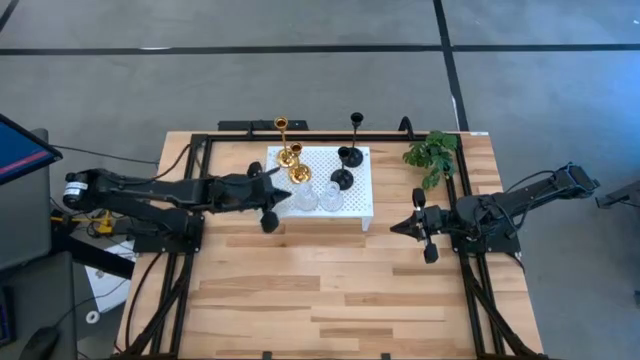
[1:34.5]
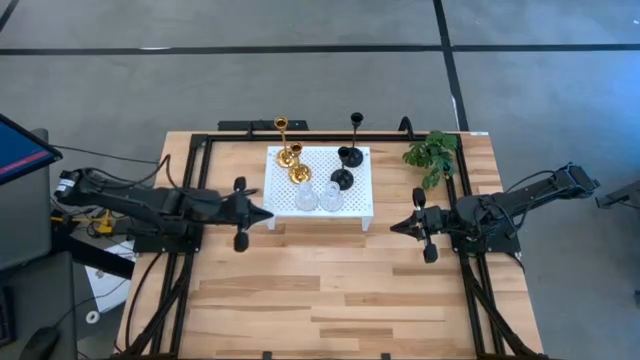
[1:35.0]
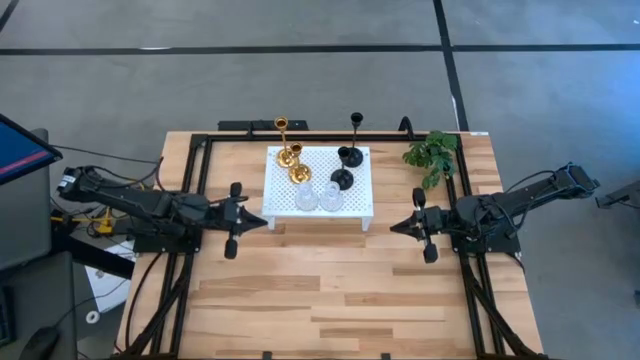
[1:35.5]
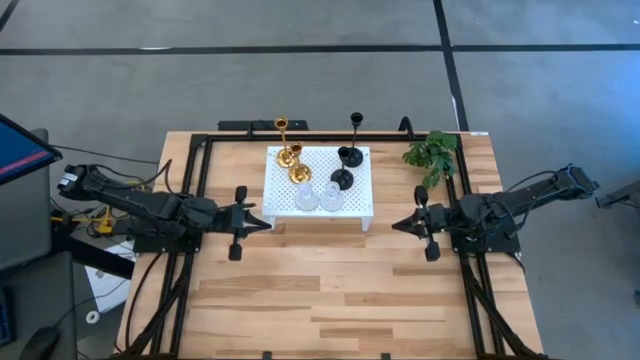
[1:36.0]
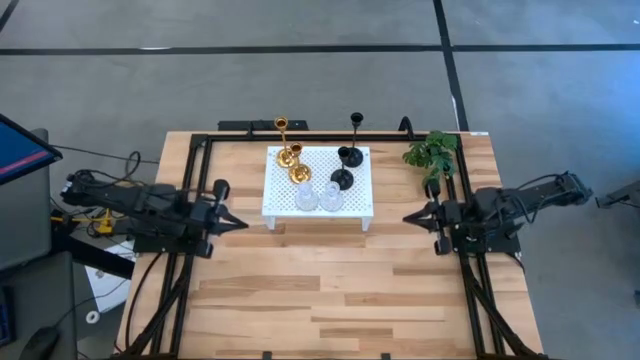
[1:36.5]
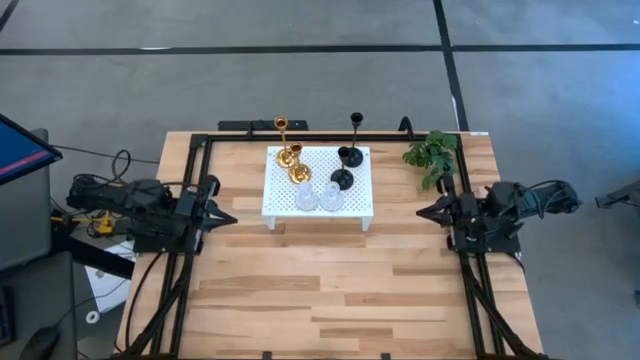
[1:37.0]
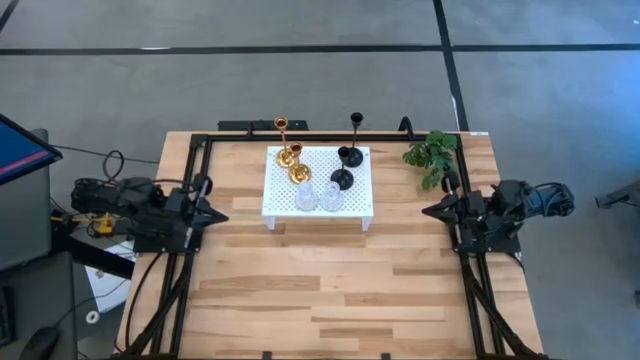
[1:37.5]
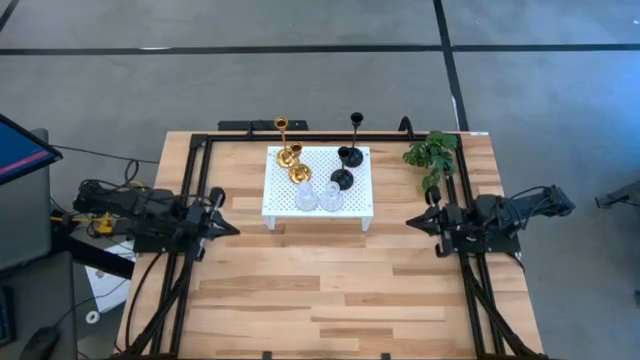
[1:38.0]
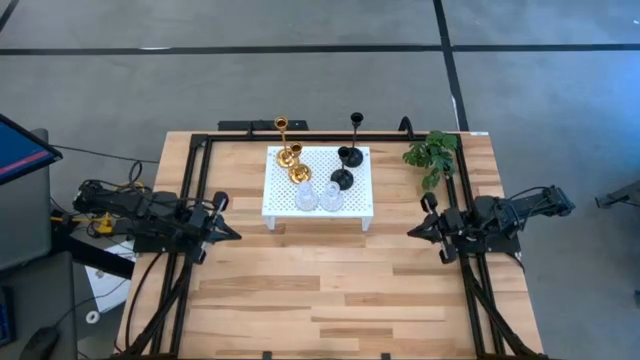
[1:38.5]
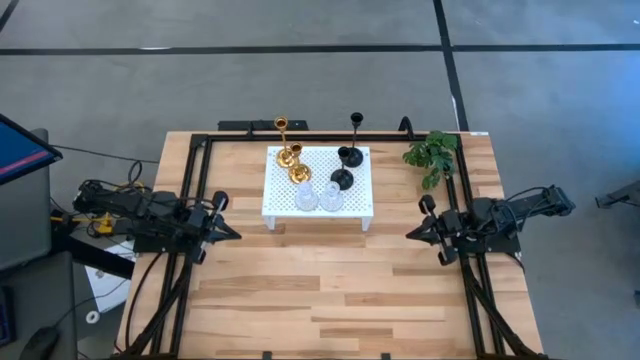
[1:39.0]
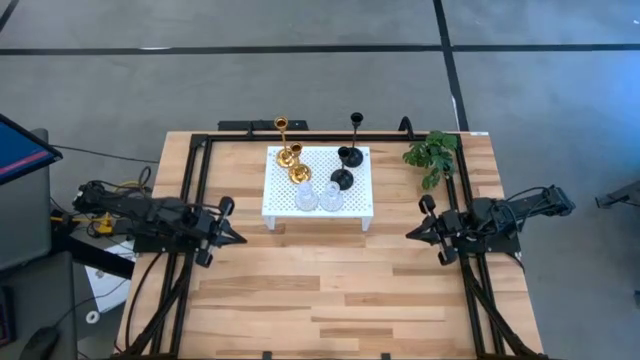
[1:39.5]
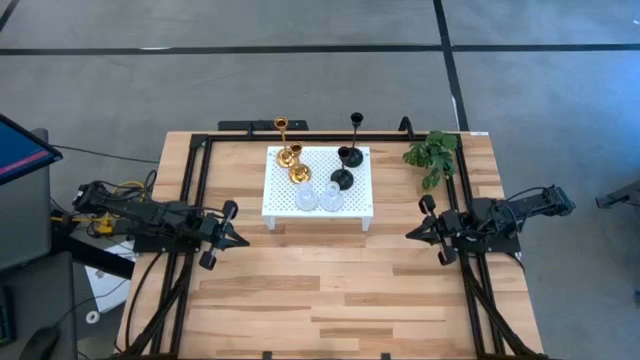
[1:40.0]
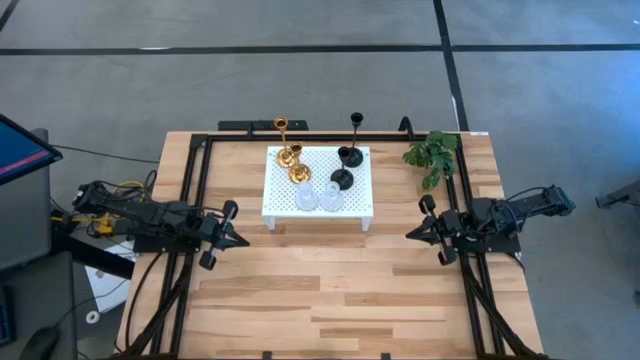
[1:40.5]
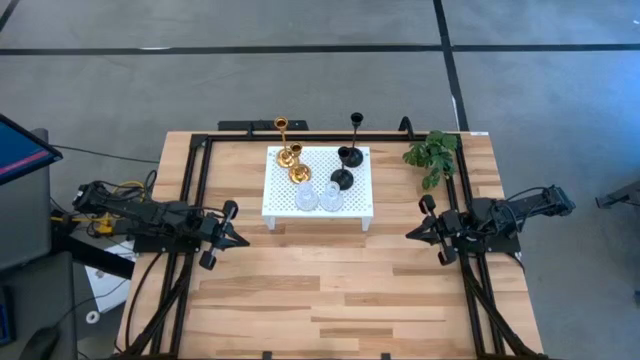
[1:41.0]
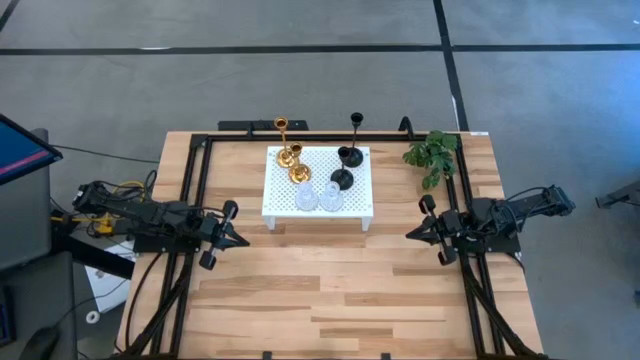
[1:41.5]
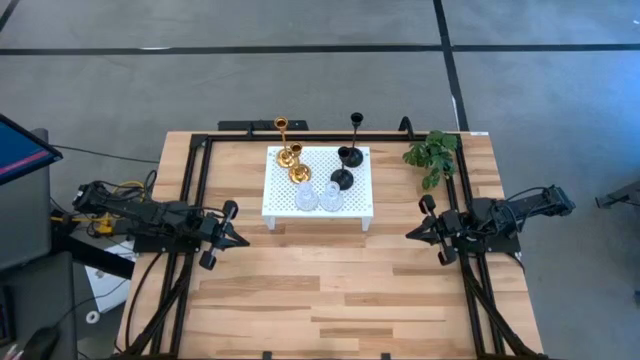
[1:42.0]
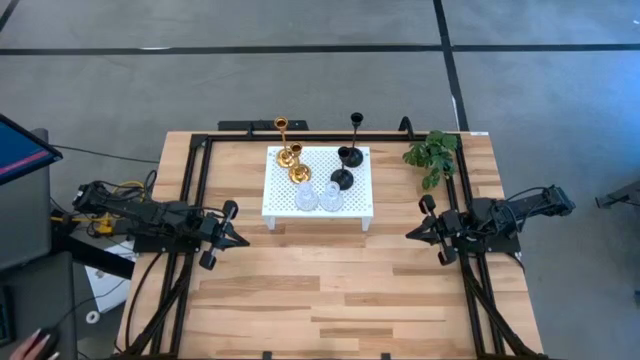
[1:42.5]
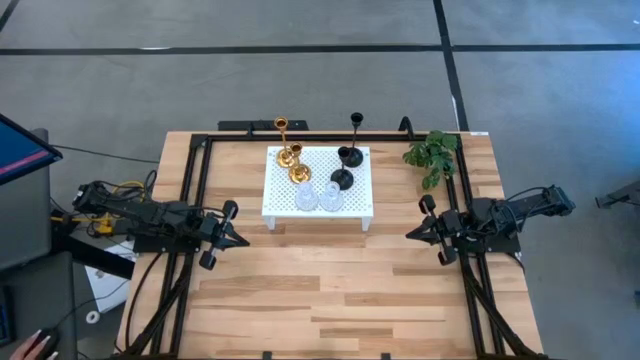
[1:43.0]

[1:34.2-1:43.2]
Task: Pick & Place candle stick holders
Return to Home Position

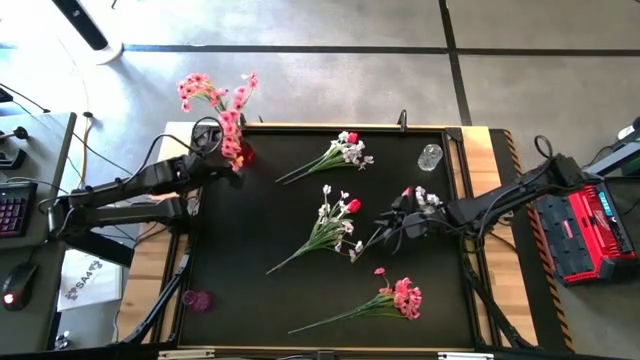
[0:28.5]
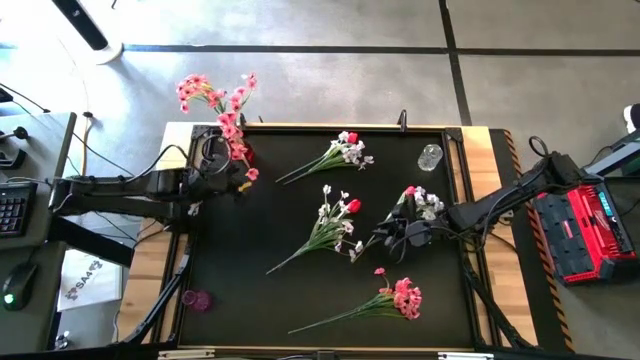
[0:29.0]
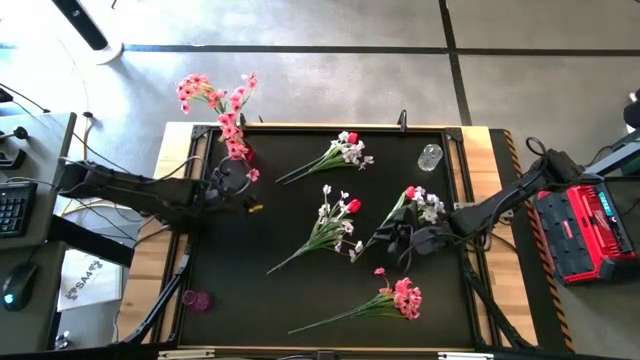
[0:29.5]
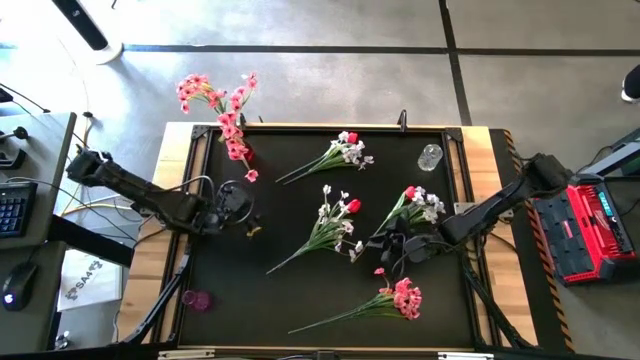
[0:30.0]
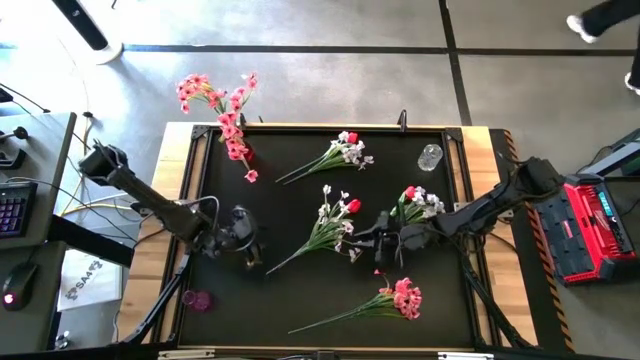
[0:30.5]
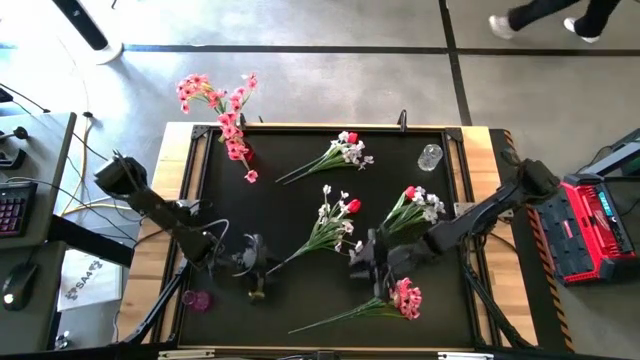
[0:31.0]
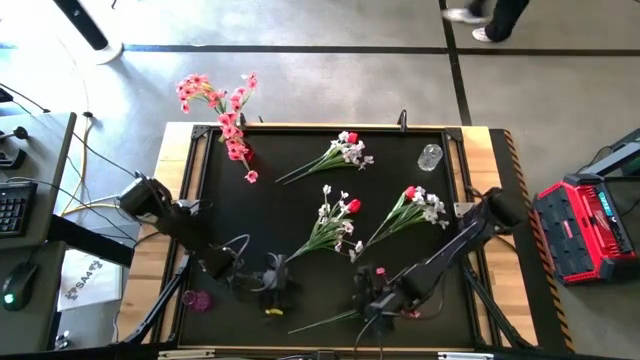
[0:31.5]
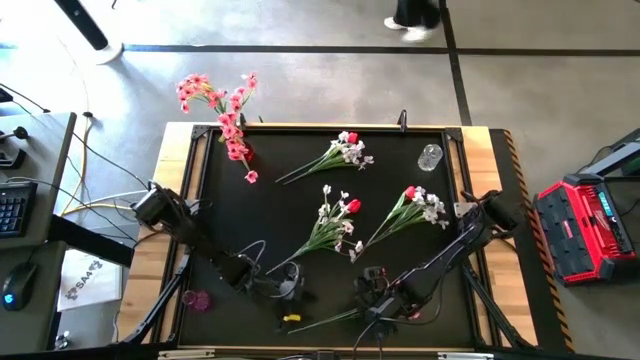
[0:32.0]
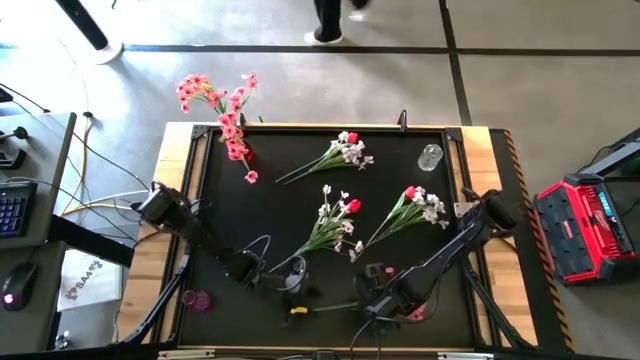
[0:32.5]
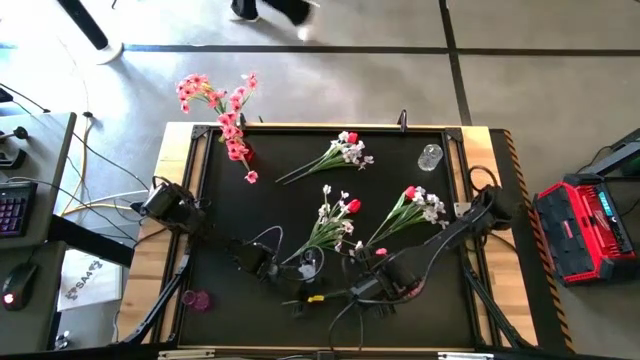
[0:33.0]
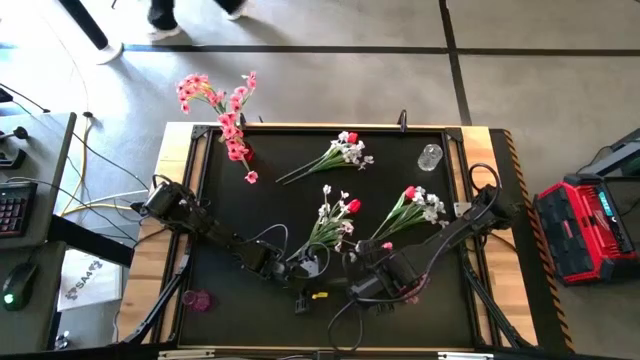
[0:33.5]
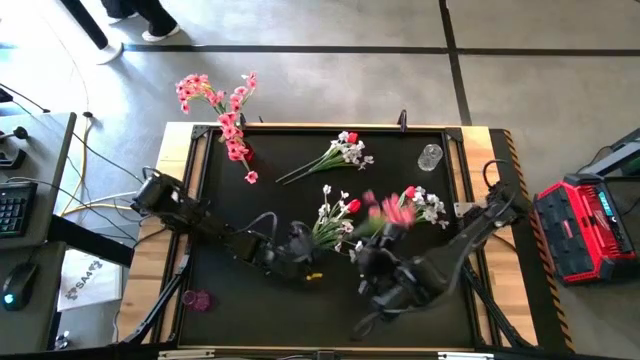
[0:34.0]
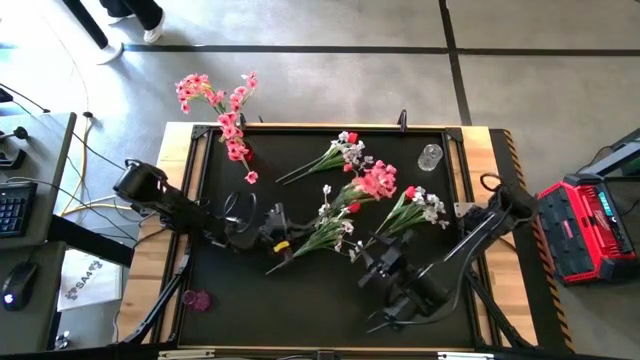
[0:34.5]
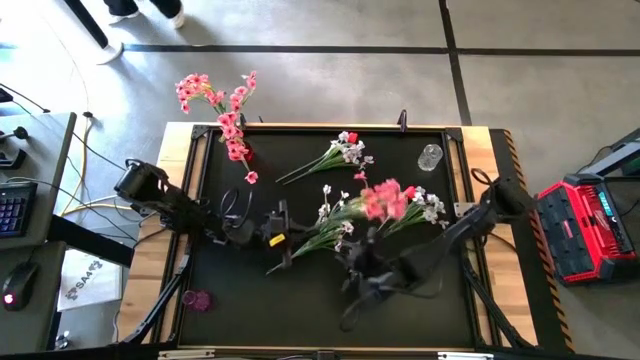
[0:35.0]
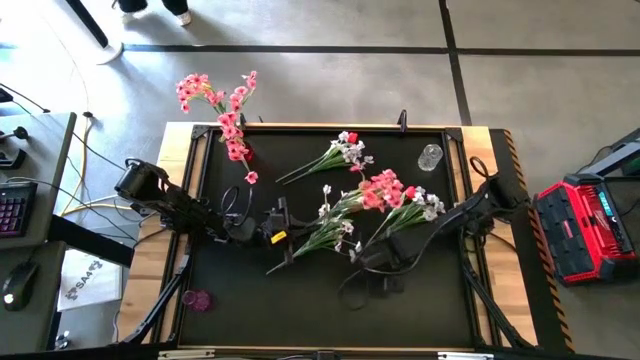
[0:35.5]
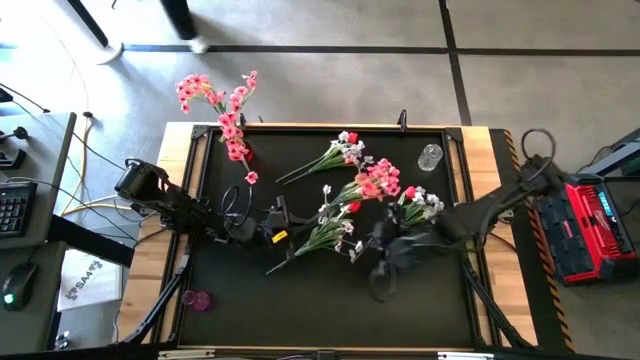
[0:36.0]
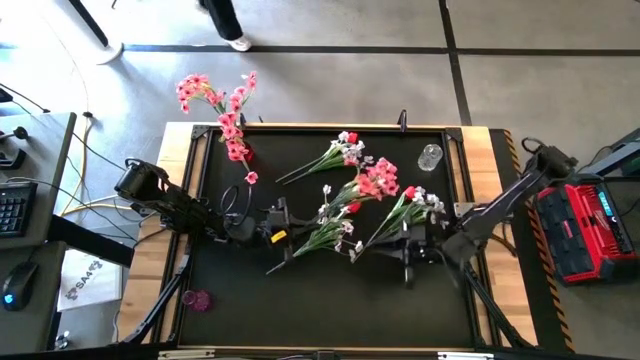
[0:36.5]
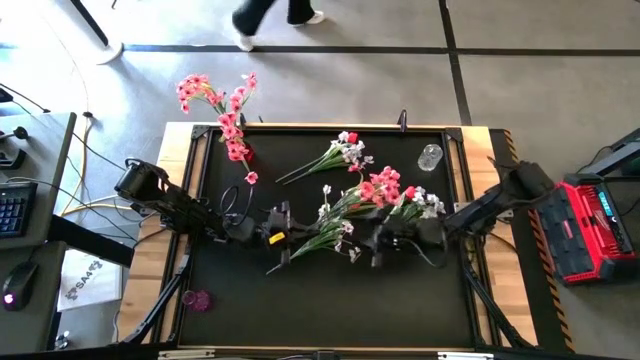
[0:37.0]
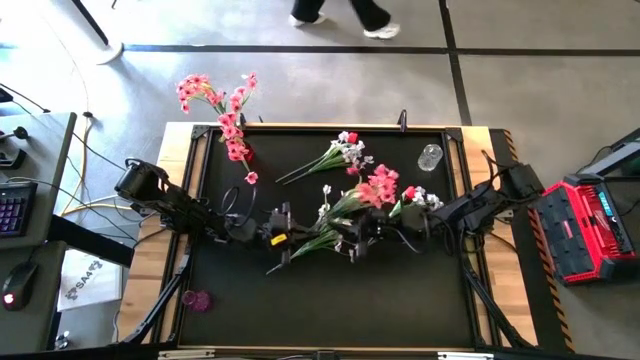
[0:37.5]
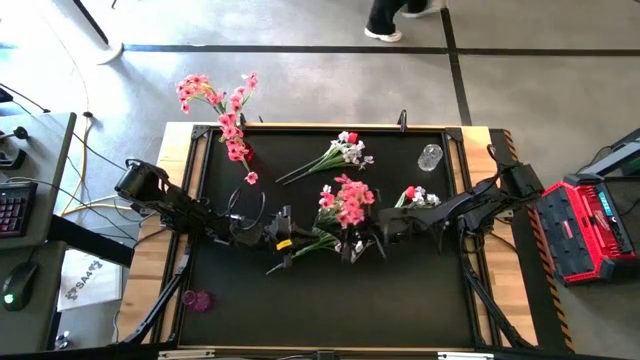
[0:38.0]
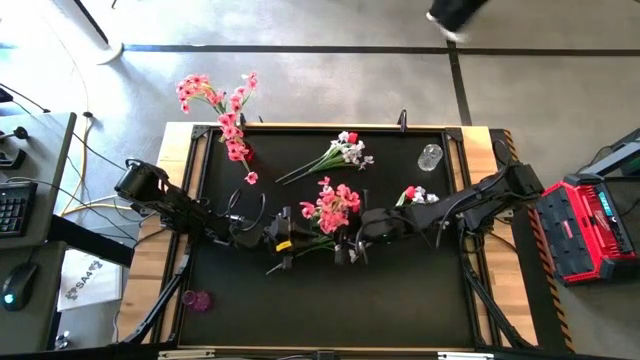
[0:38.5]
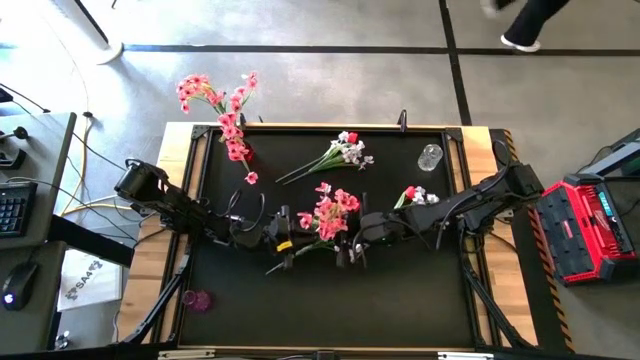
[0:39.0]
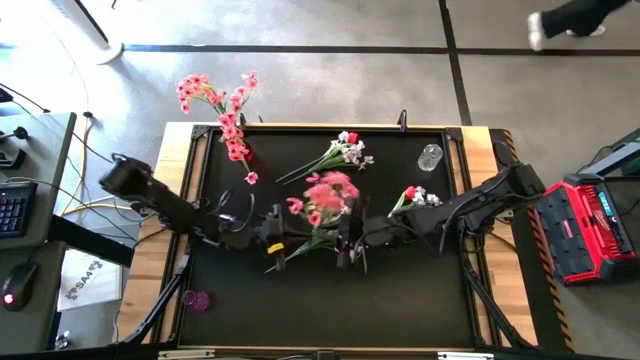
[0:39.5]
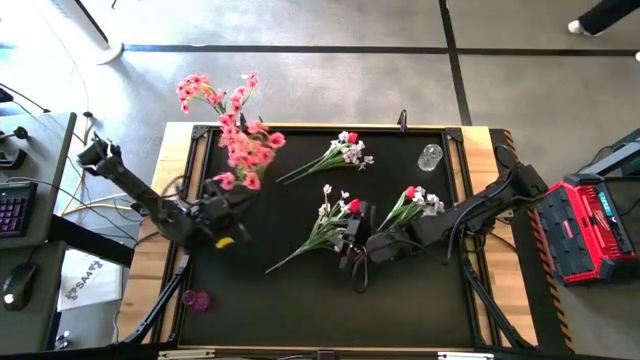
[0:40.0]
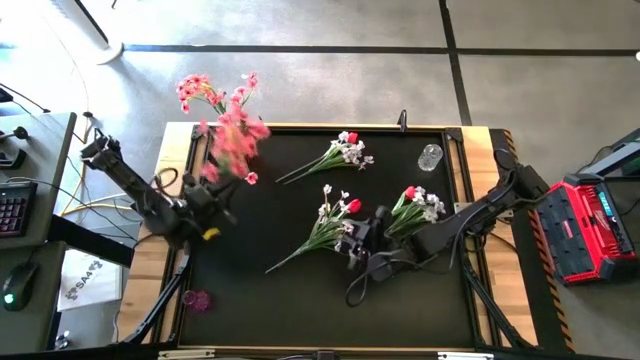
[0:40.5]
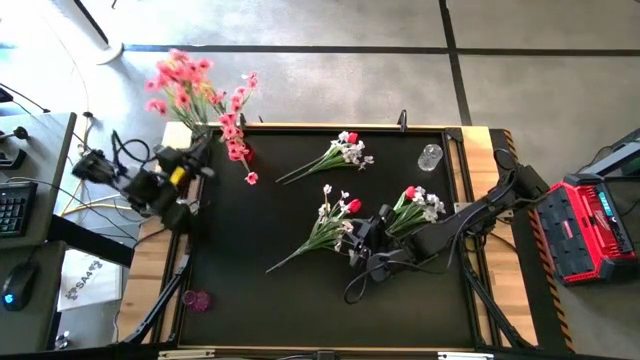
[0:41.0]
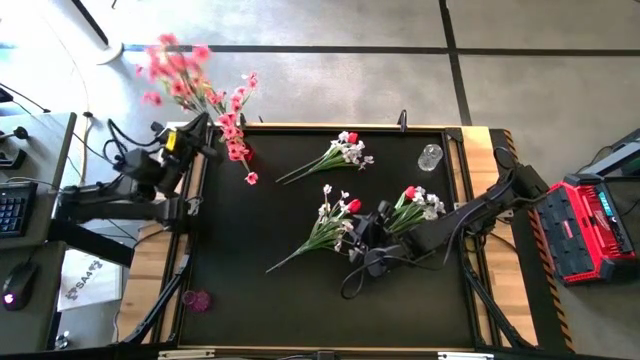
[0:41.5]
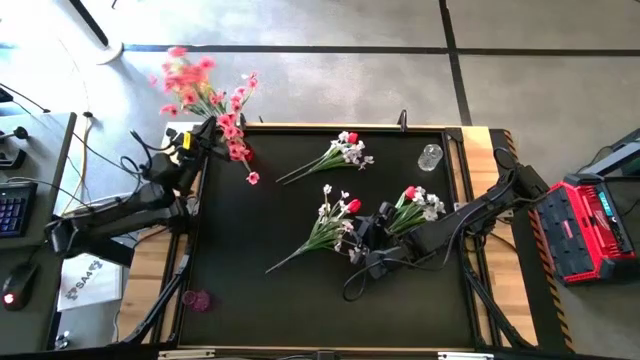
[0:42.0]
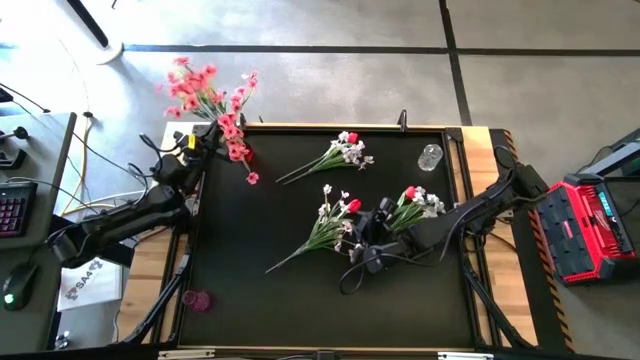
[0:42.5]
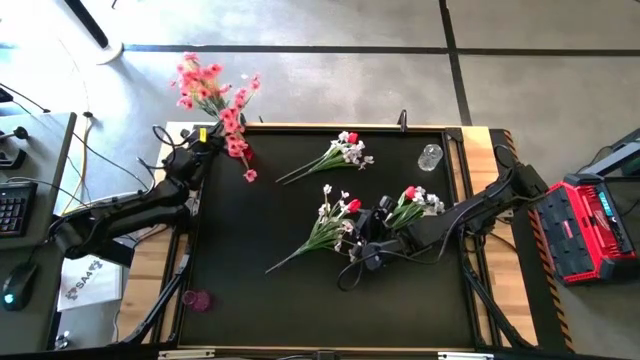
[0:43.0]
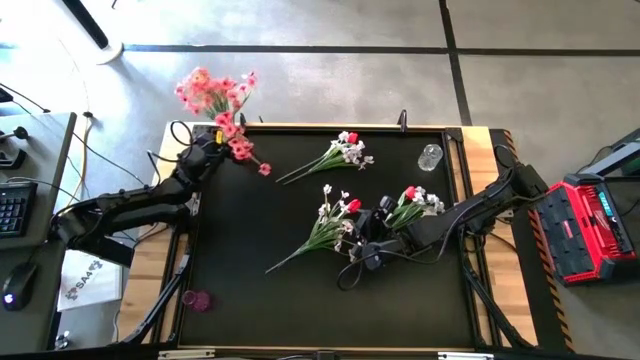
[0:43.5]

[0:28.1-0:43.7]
Task: Sort flowers into vase by color
Put the pink flower into the red vase
